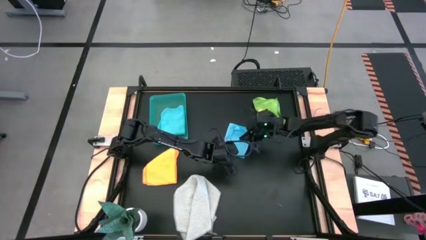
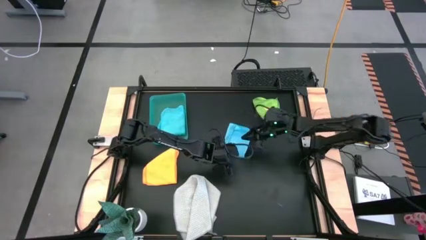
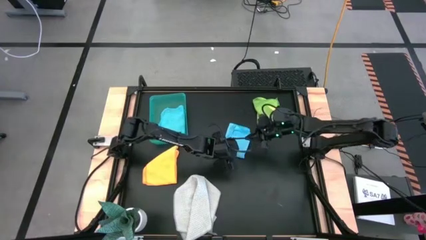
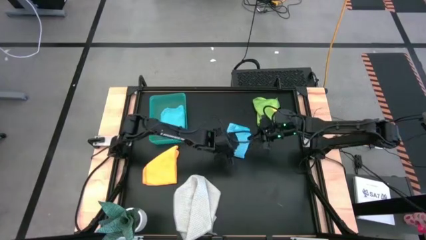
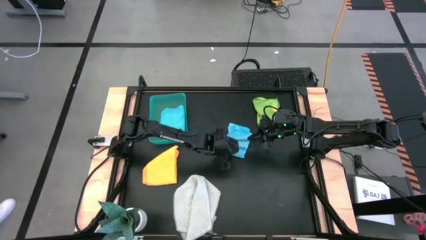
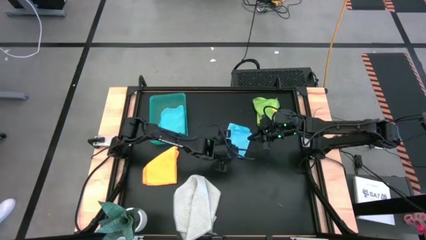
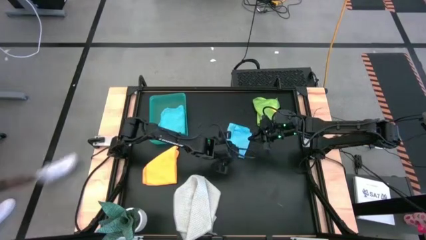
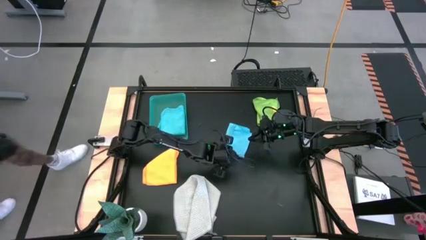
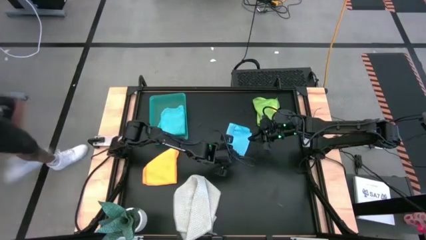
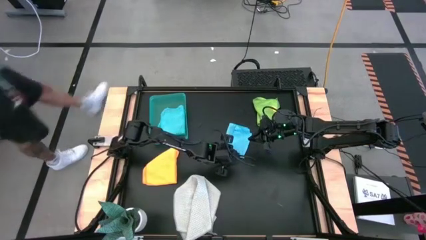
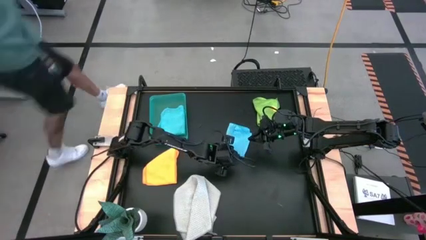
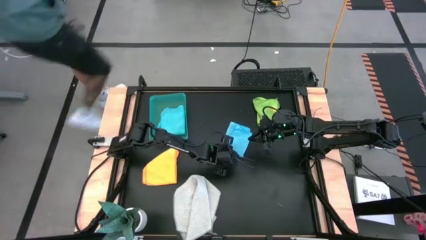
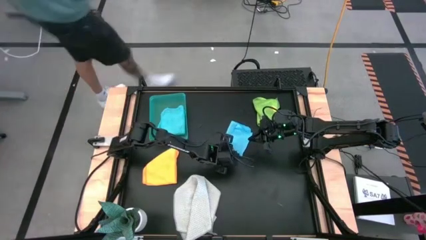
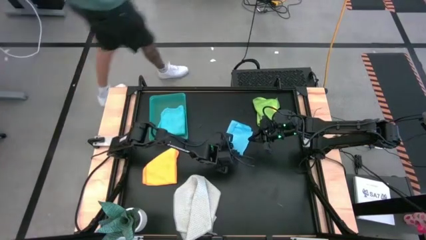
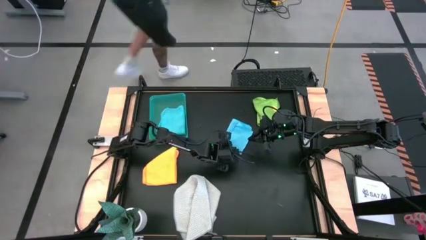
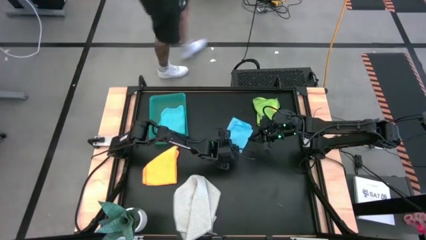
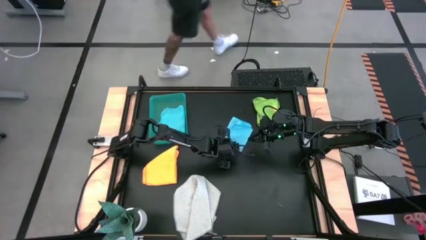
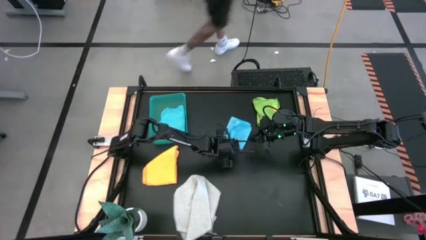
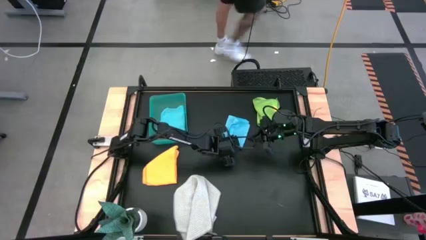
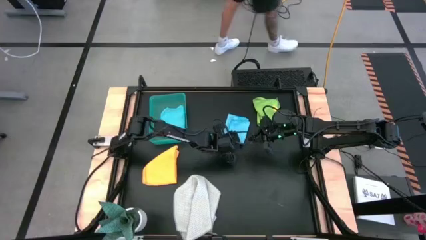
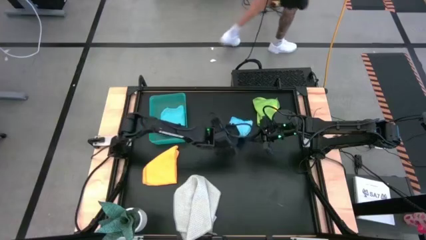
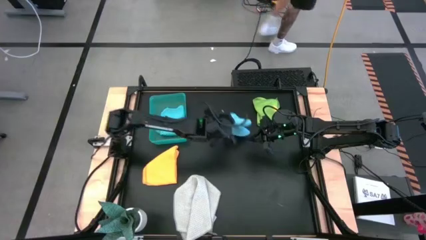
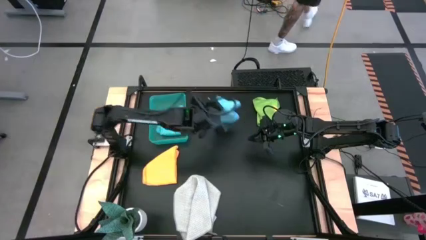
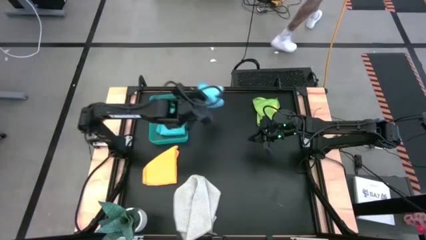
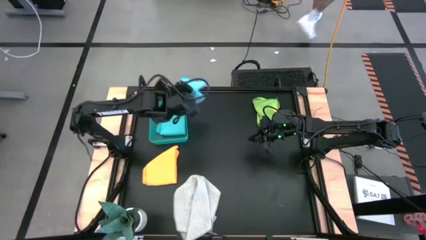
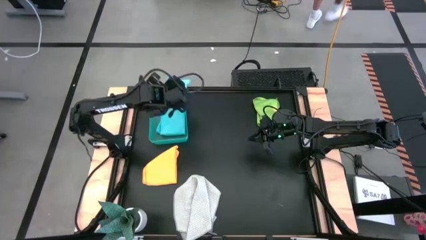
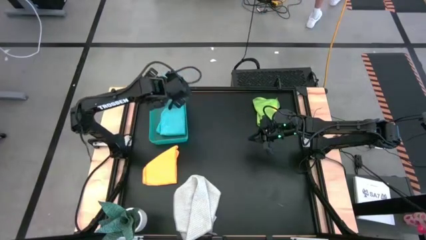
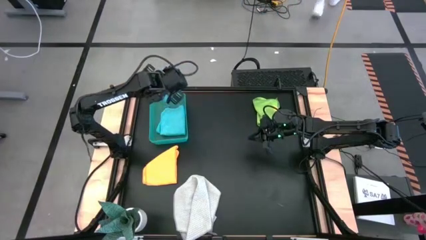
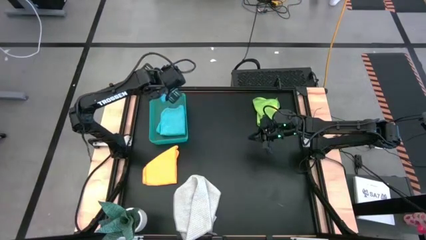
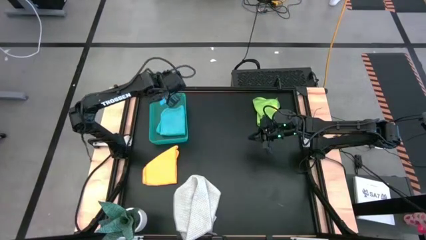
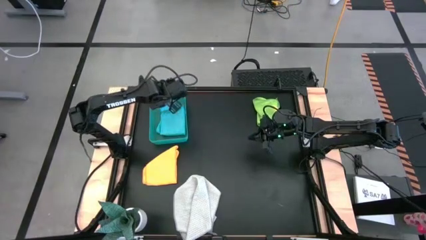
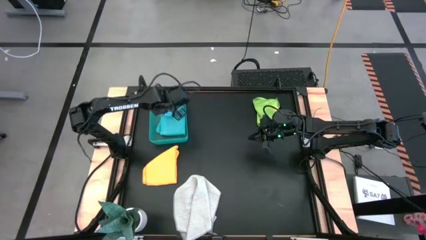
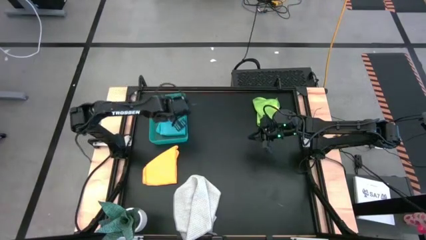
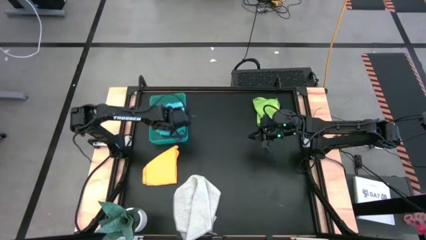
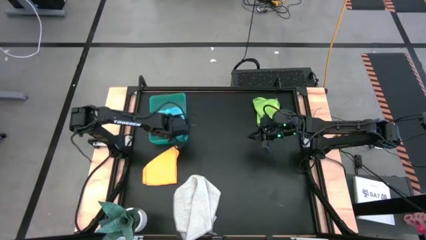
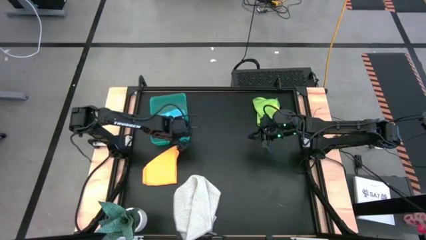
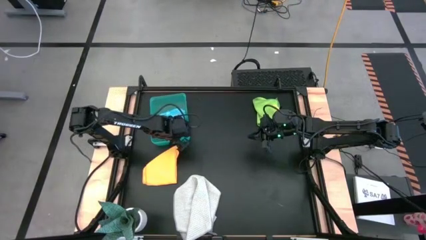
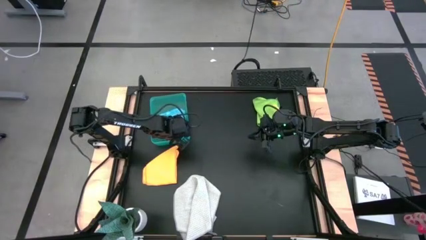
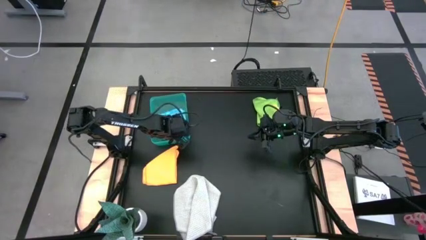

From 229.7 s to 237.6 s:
Task: Fold microfiber towels
Stack the folded blue microfiber towel on top of the blue microfiber towel into the bin

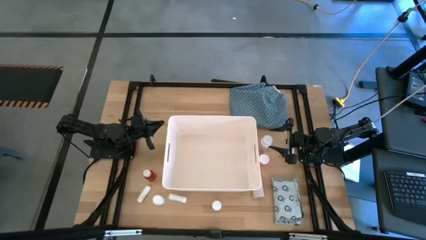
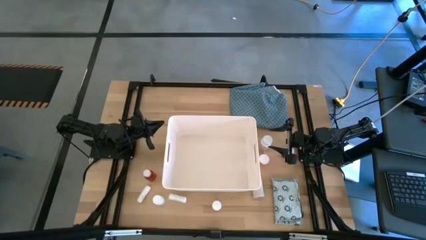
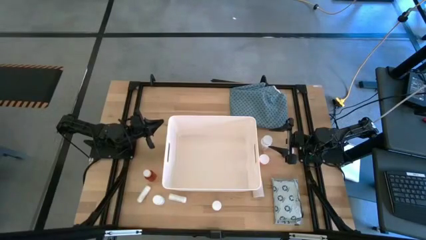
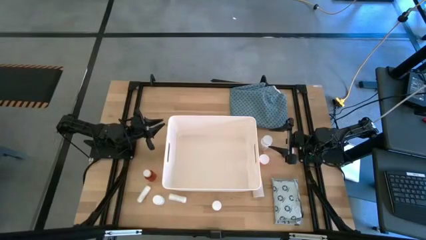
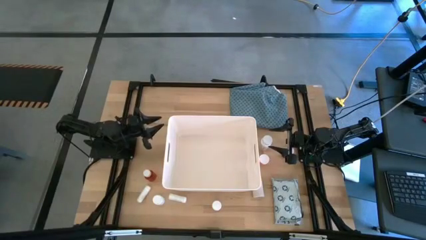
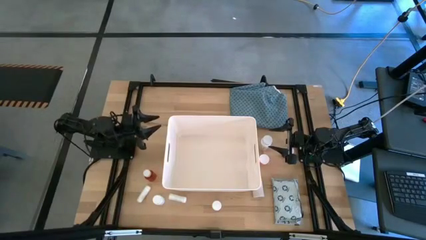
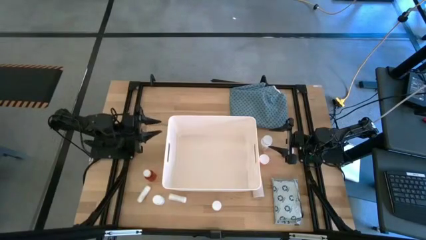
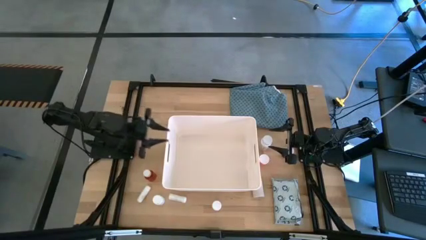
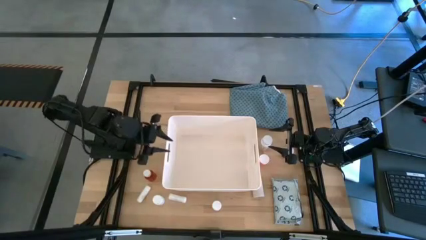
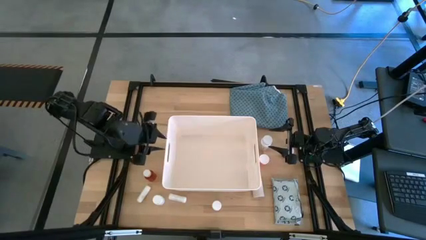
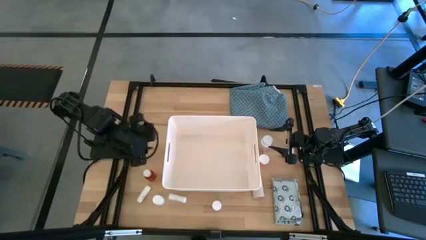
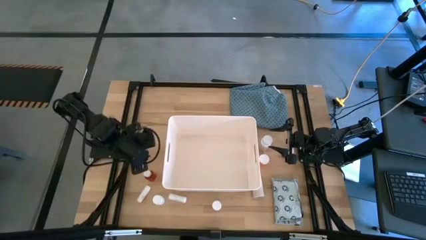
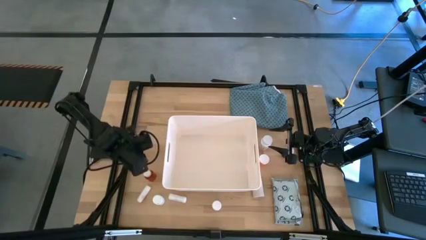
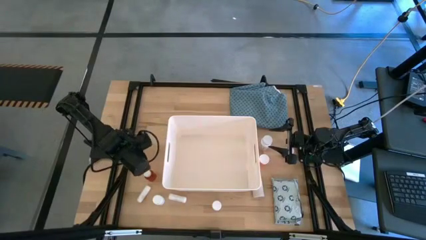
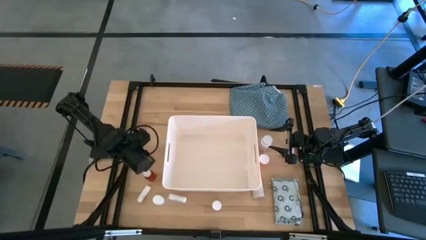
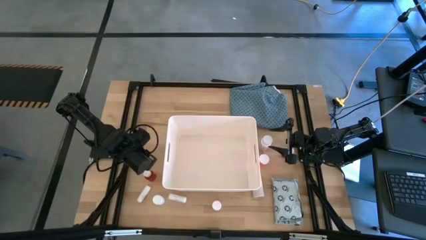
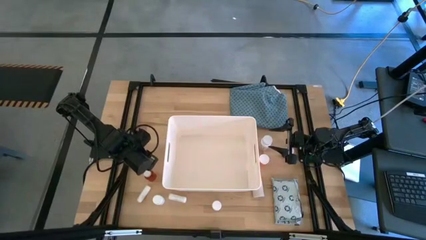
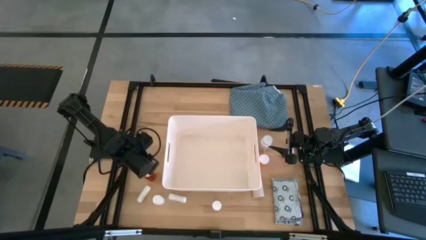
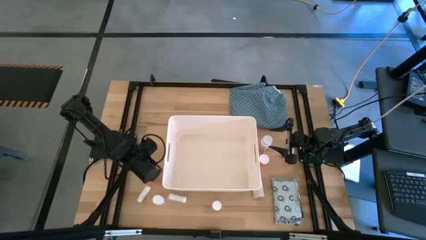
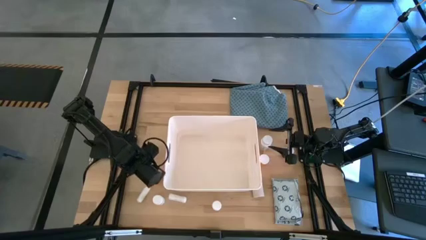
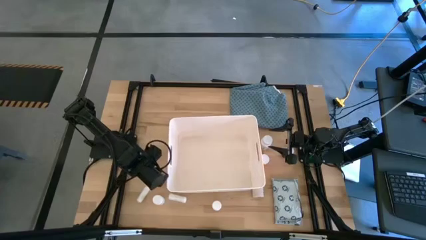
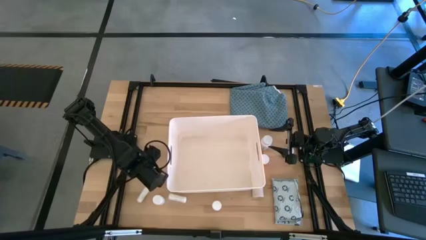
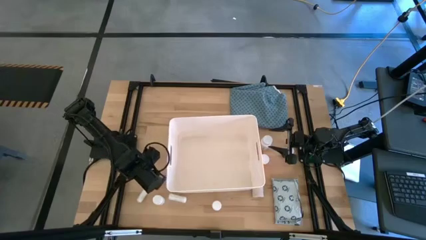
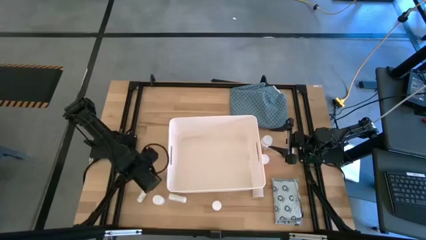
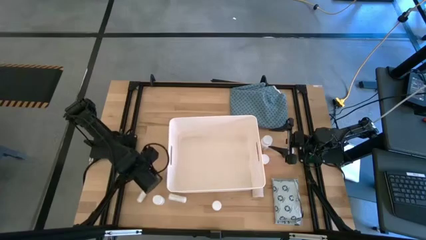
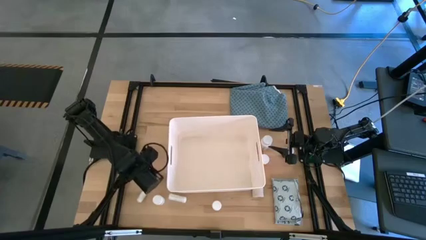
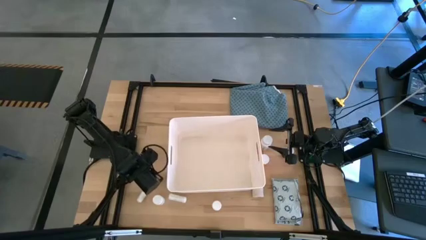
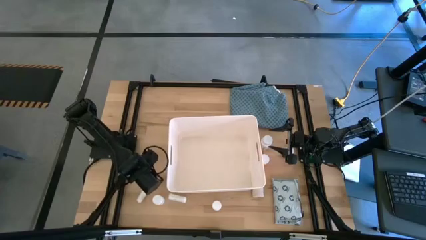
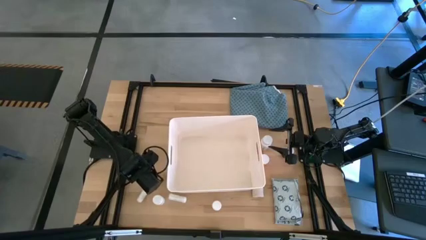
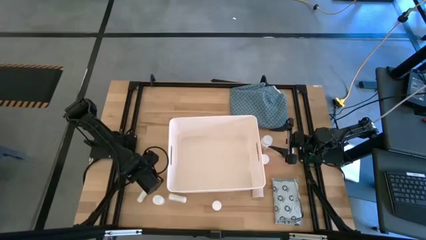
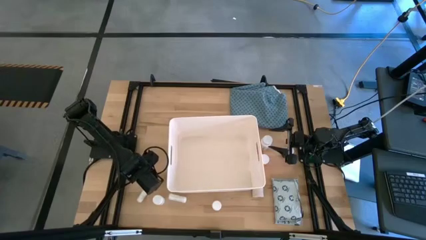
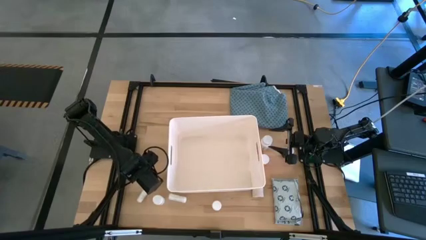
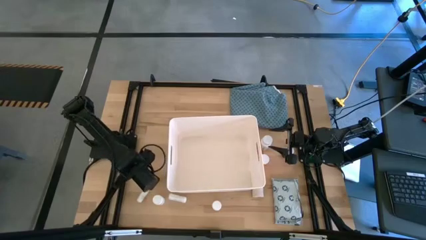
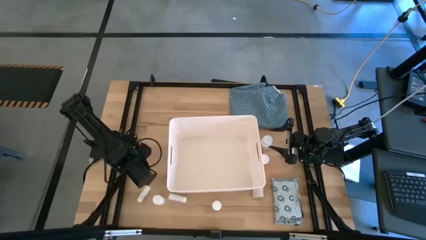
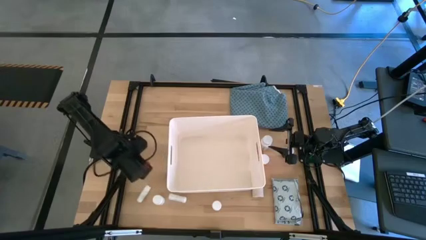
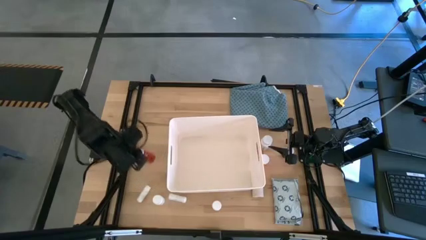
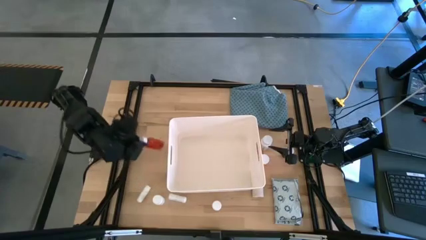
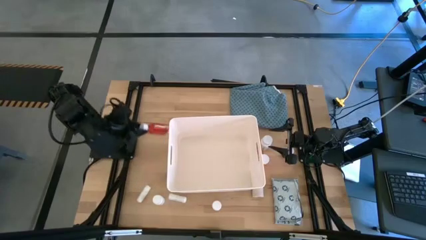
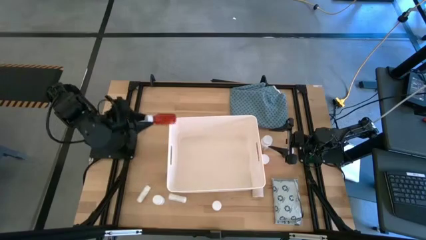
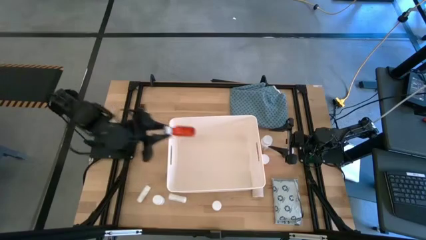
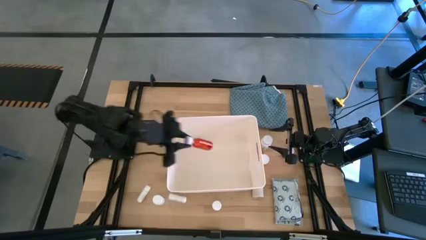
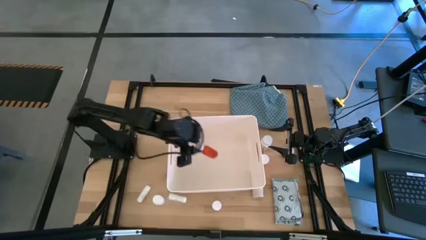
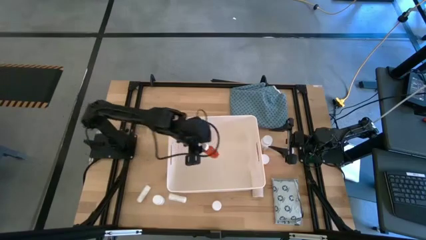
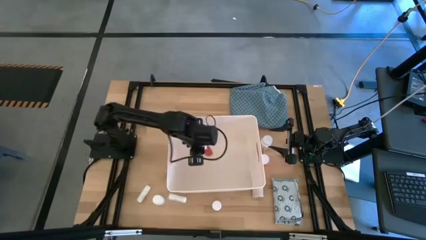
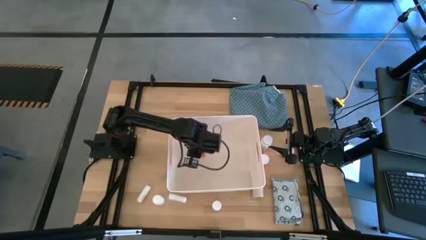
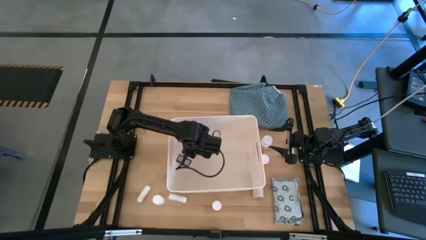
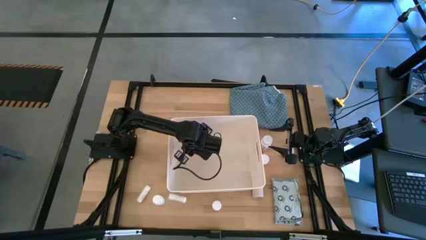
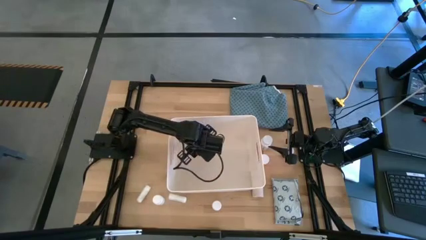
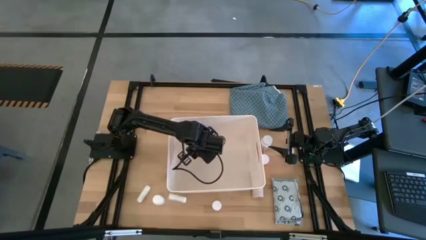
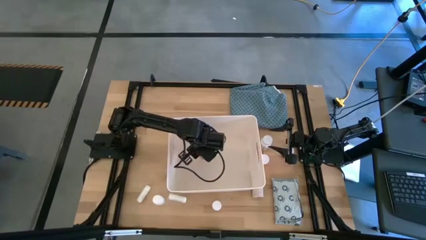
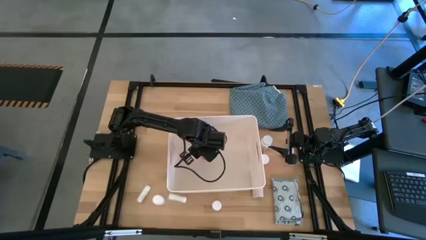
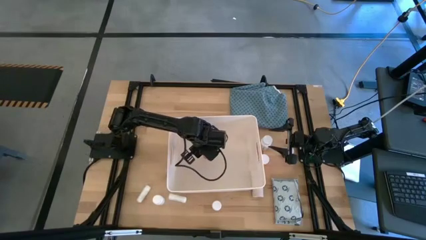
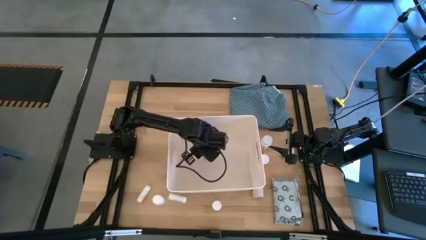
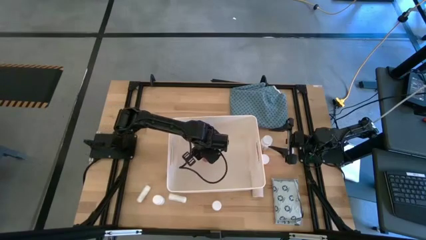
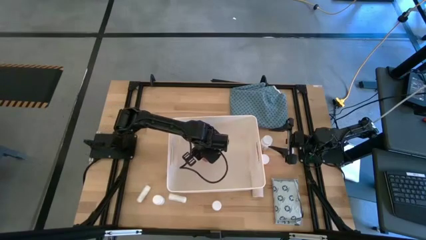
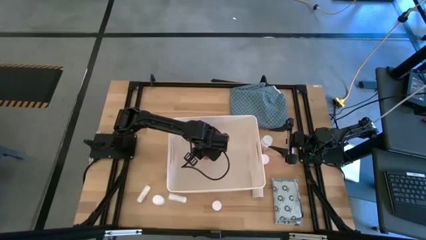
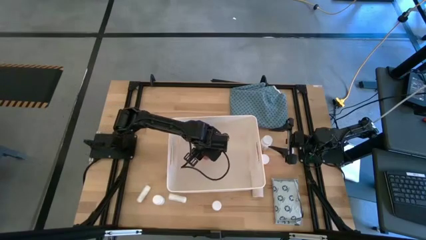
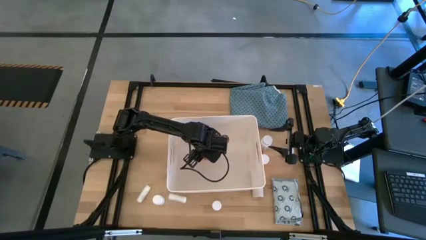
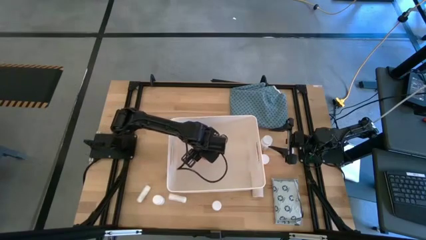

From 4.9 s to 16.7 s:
Task: Pick & place medical supplies in basket/bin
Put the red medicine bottle into the white bin
